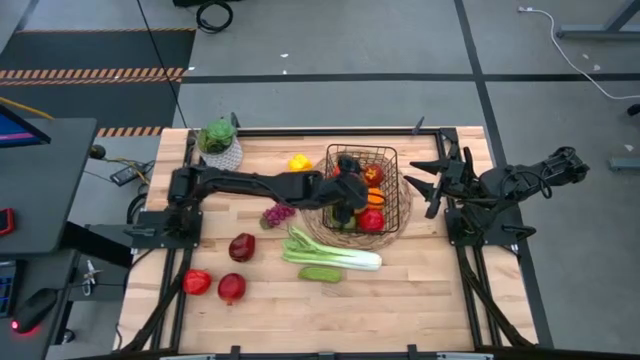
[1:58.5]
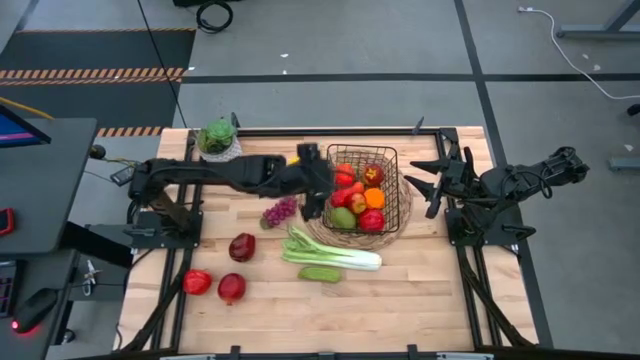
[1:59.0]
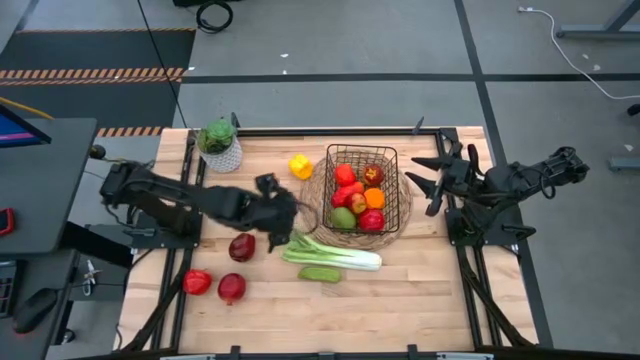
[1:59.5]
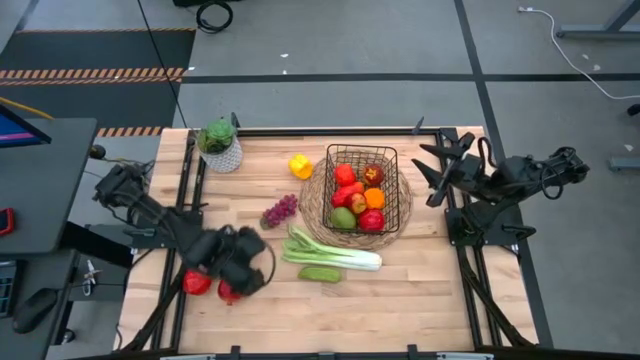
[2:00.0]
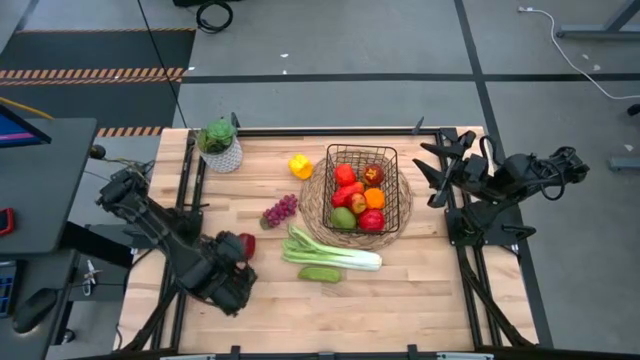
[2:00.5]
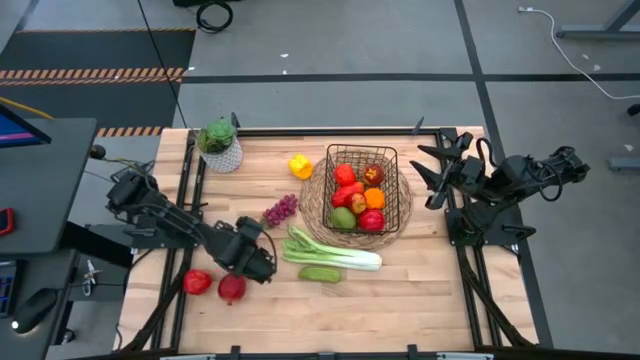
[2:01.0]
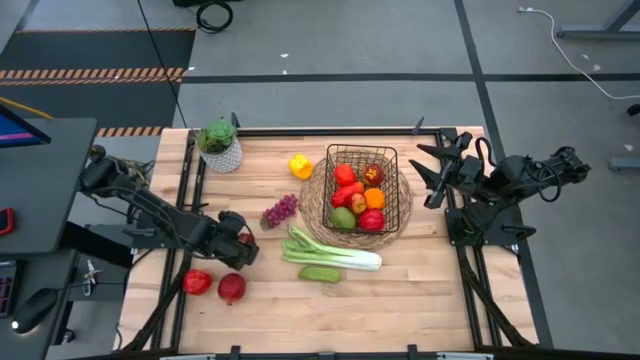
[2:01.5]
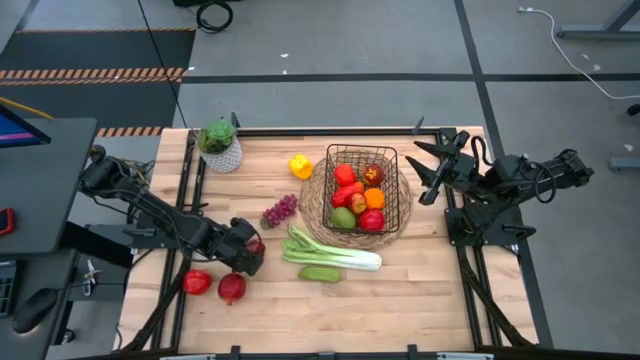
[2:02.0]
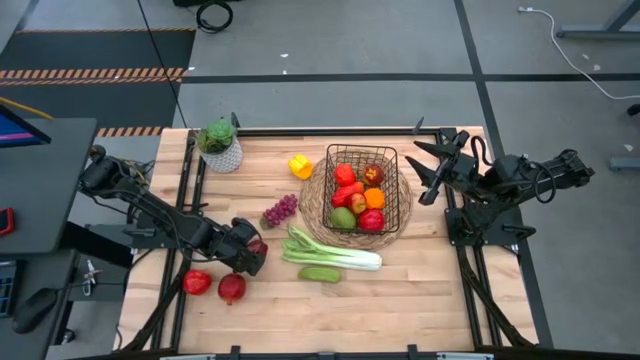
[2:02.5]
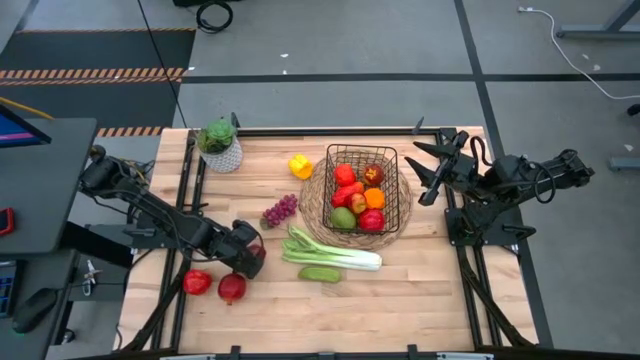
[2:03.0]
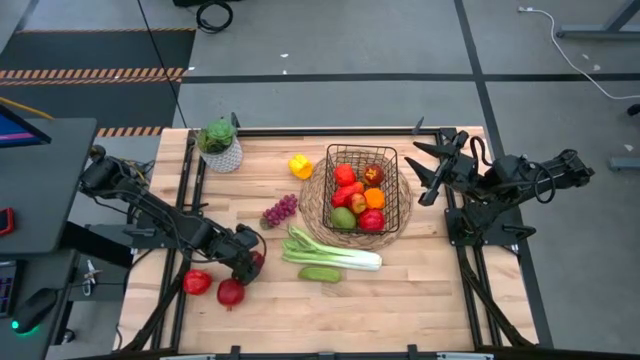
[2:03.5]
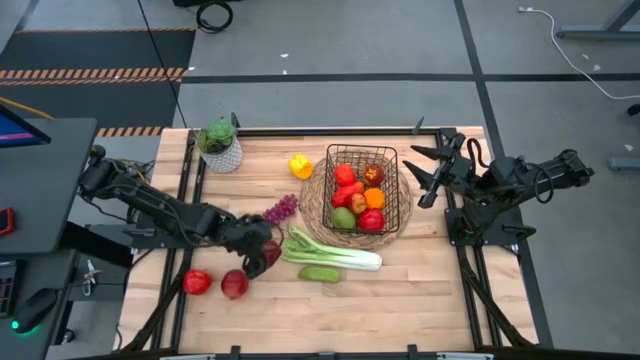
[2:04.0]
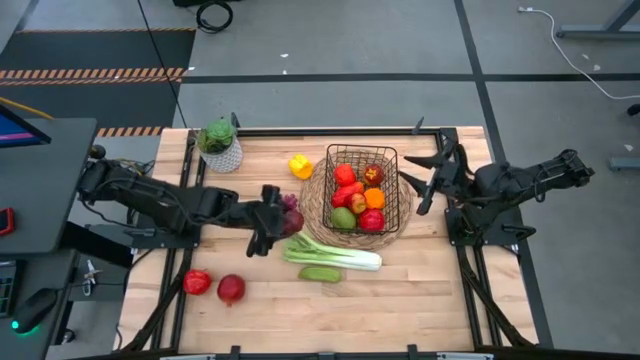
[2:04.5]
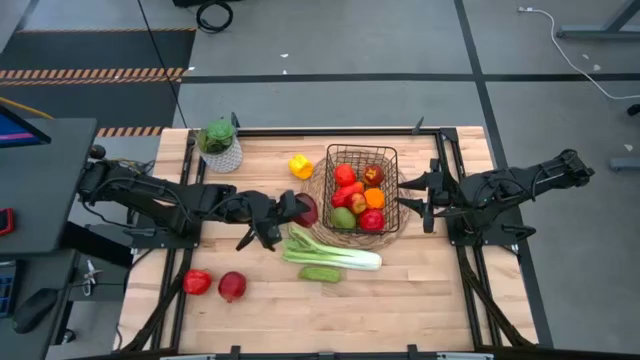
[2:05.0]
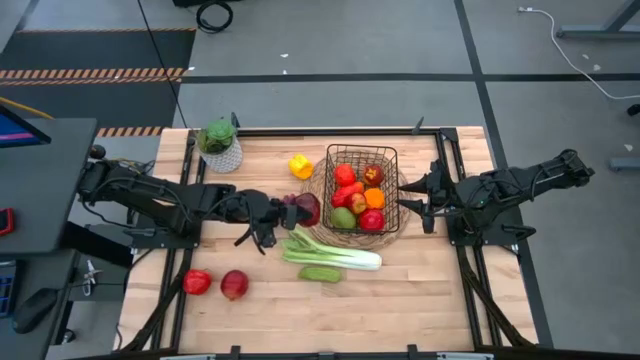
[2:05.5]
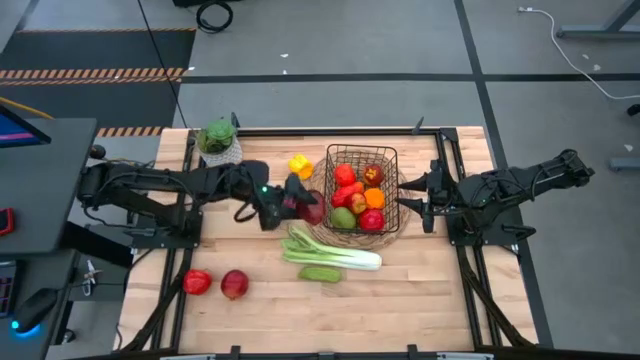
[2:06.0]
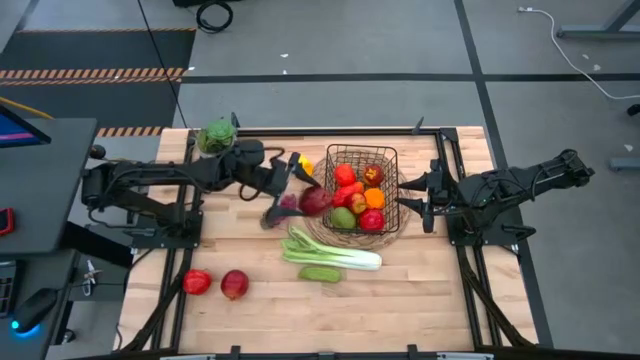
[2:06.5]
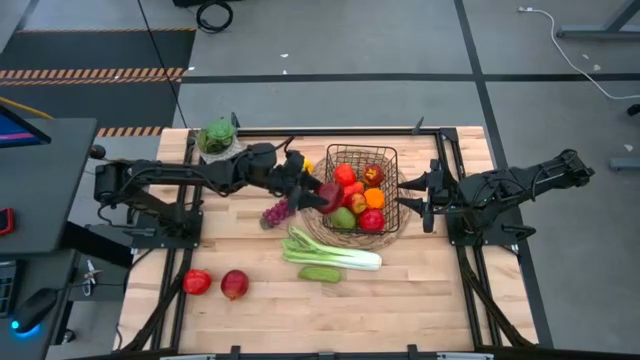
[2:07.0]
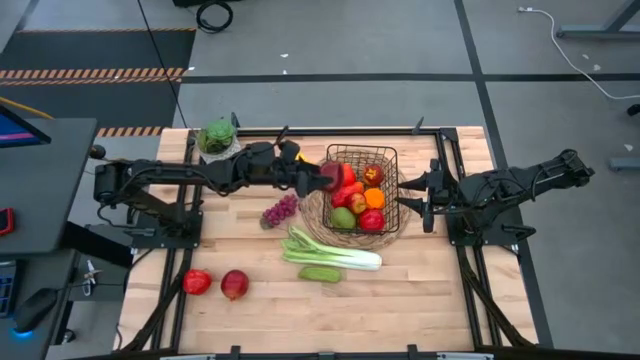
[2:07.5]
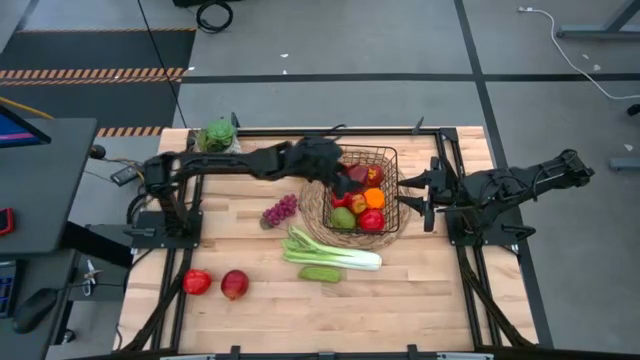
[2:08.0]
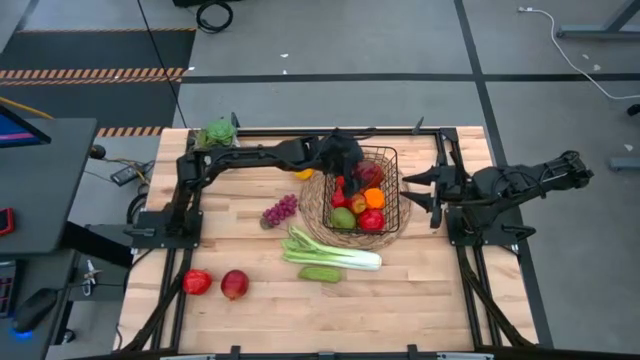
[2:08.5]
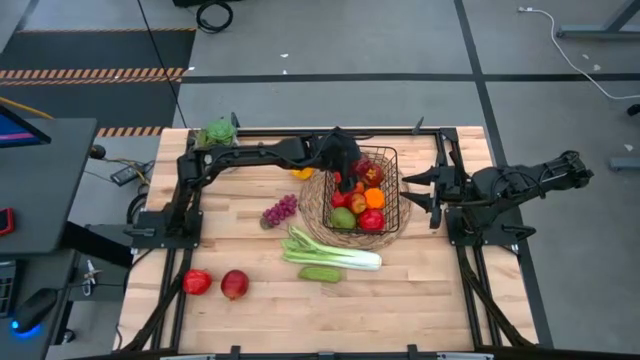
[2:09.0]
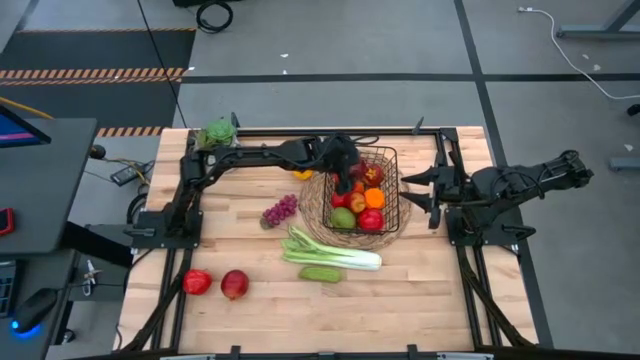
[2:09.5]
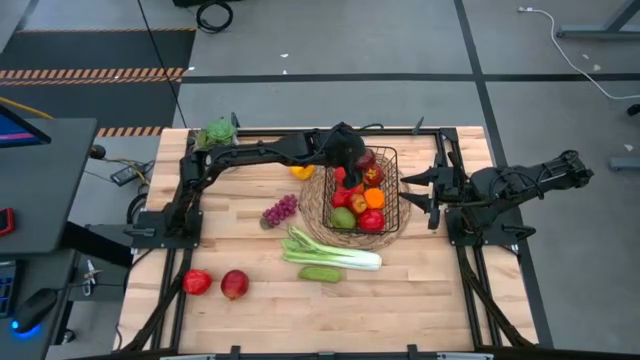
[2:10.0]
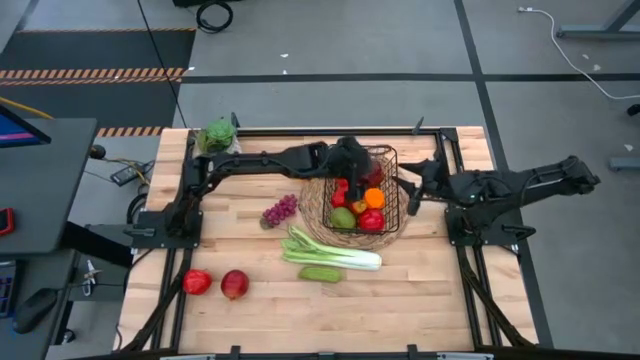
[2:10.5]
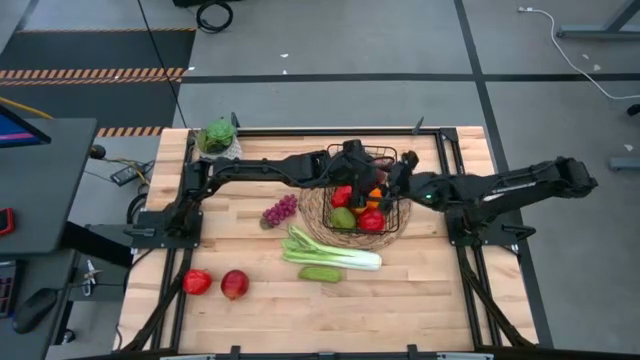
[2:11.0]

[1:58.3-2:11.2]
Task: Build produce basket
Put the top apple into the wire basket
